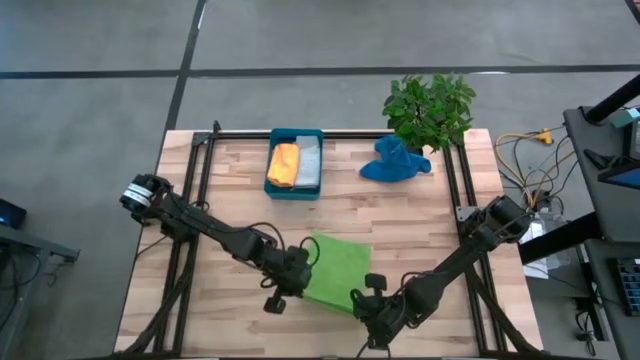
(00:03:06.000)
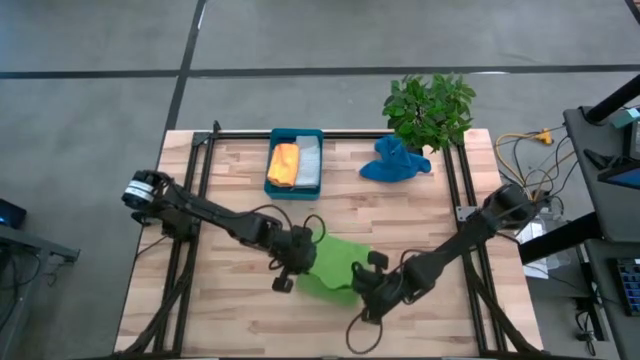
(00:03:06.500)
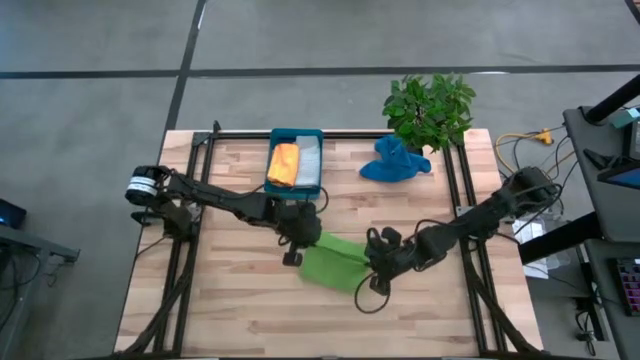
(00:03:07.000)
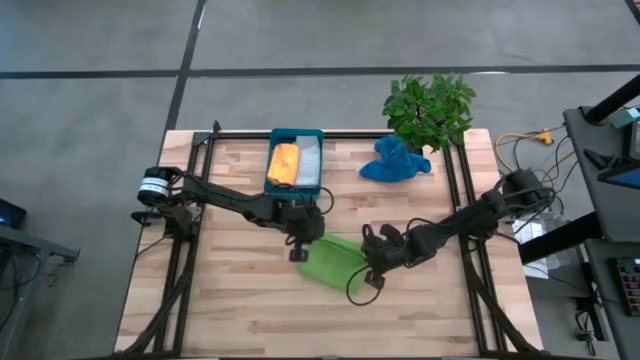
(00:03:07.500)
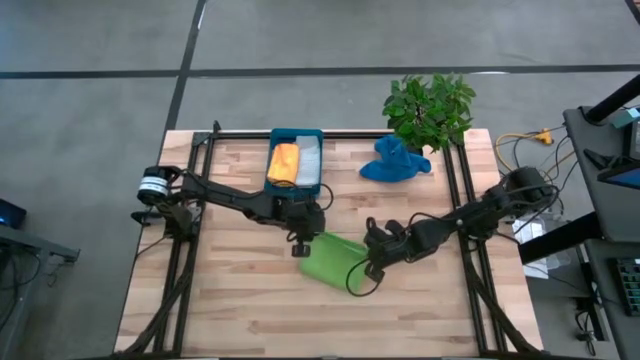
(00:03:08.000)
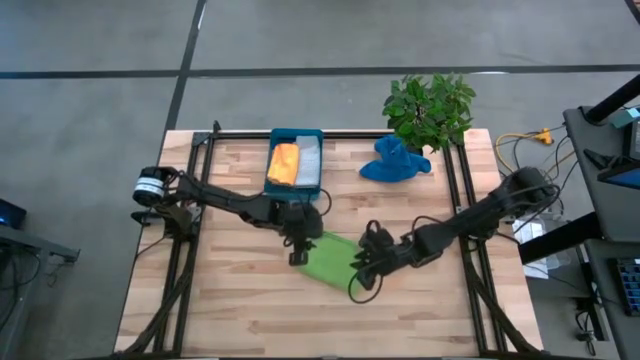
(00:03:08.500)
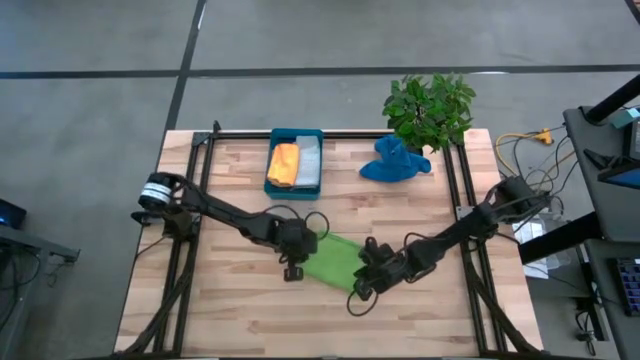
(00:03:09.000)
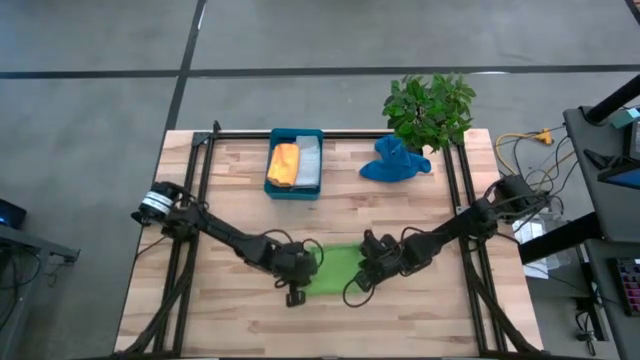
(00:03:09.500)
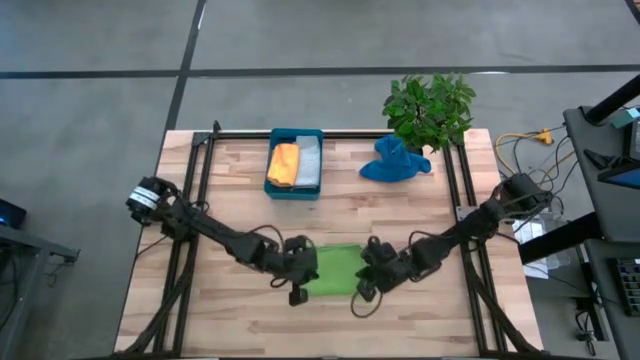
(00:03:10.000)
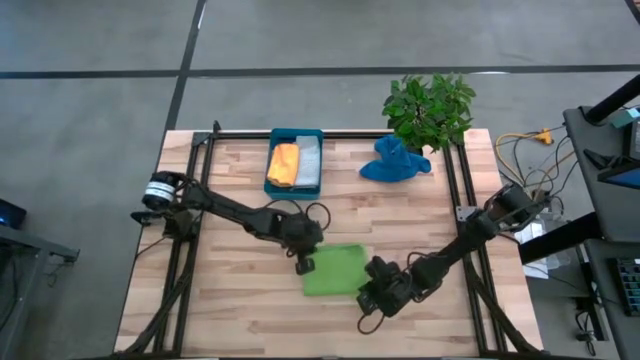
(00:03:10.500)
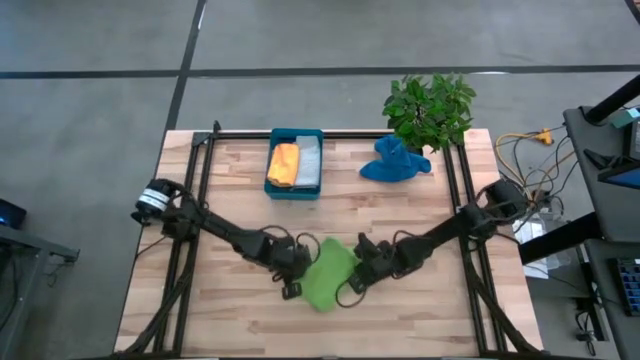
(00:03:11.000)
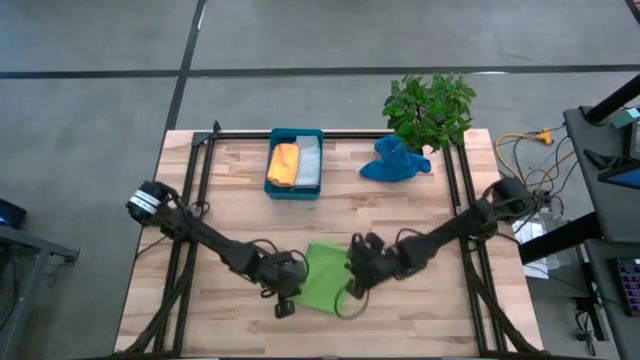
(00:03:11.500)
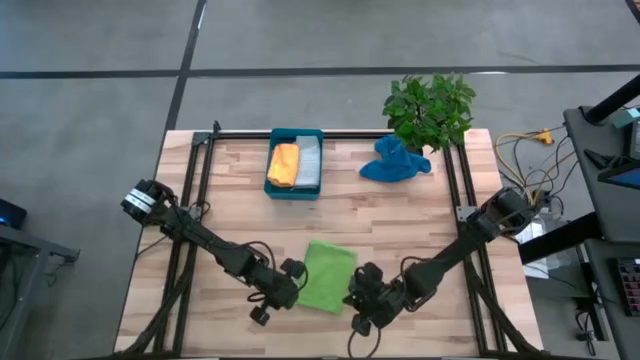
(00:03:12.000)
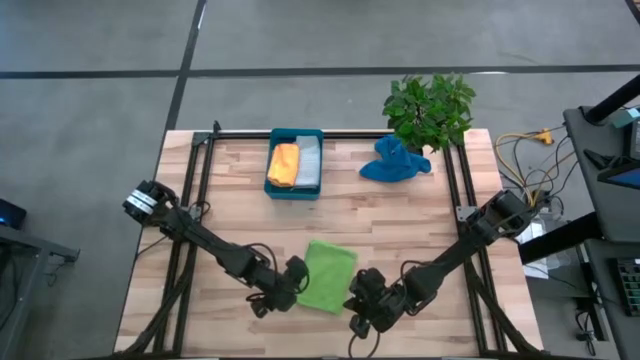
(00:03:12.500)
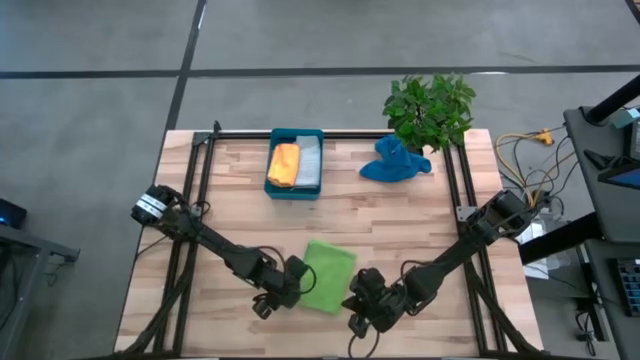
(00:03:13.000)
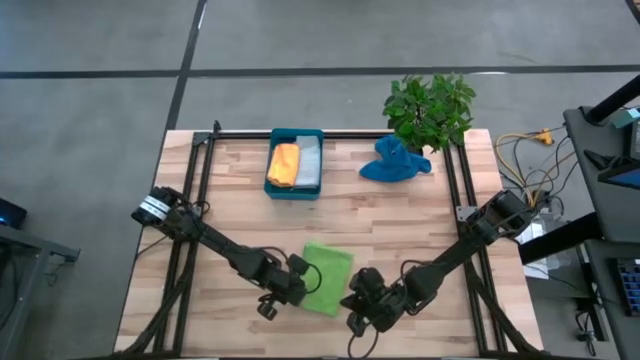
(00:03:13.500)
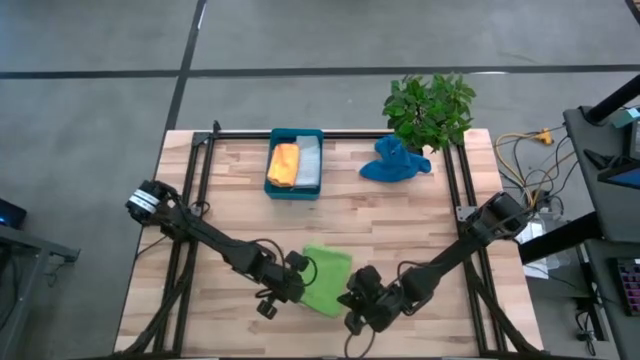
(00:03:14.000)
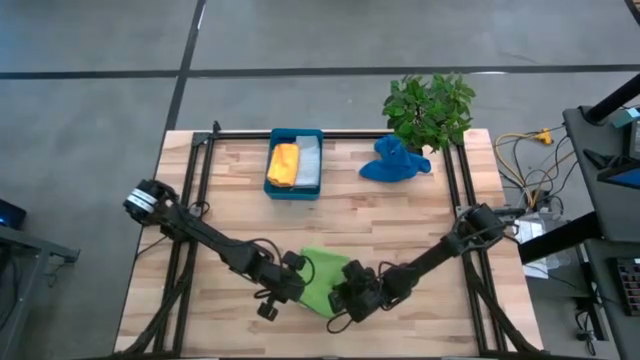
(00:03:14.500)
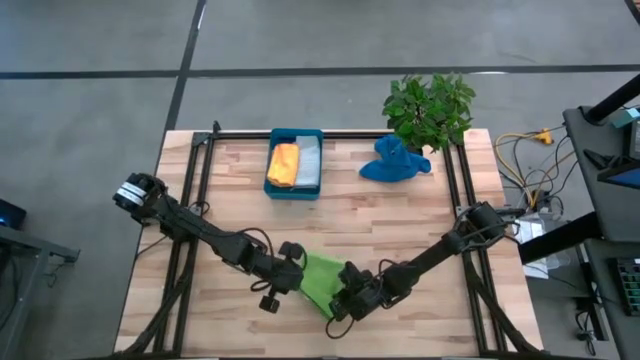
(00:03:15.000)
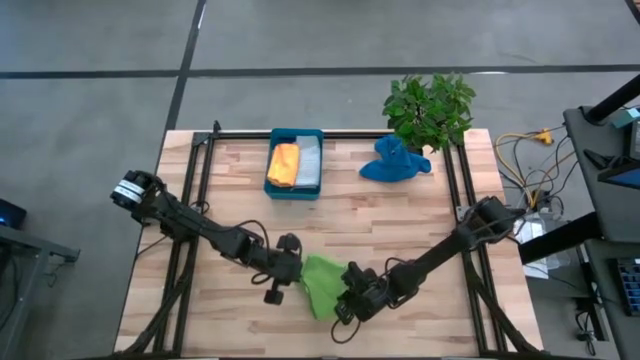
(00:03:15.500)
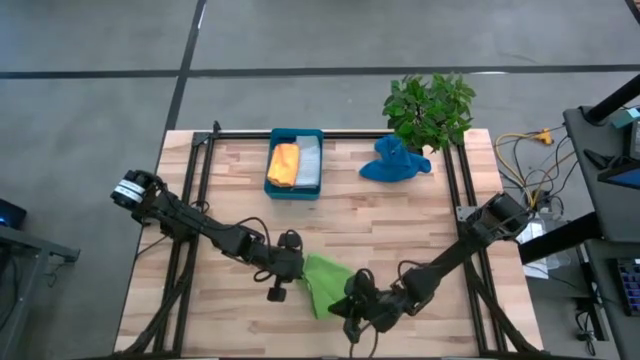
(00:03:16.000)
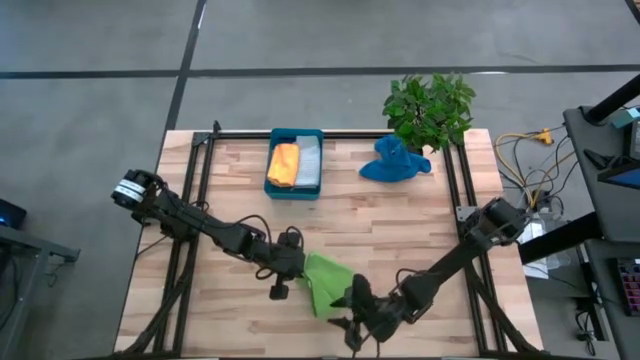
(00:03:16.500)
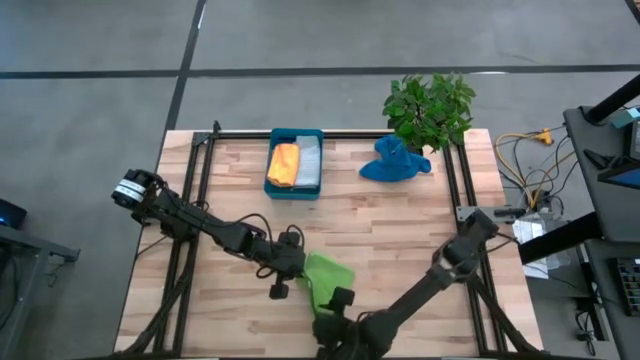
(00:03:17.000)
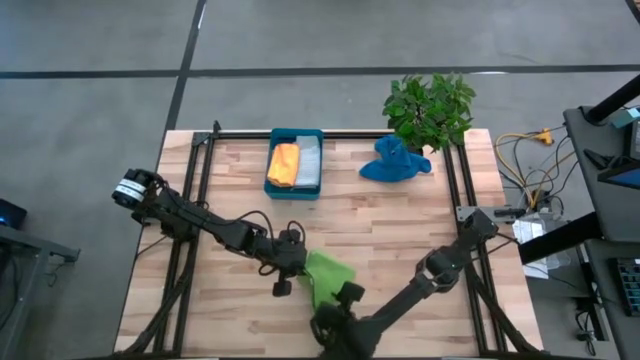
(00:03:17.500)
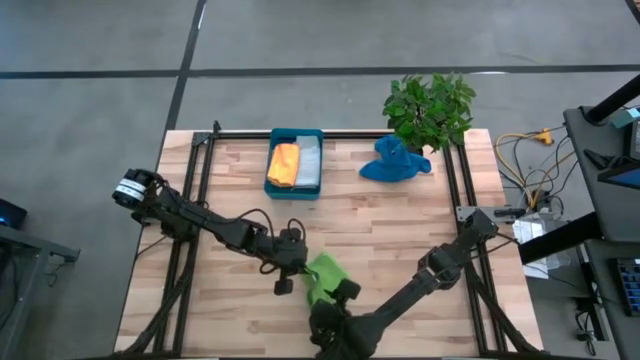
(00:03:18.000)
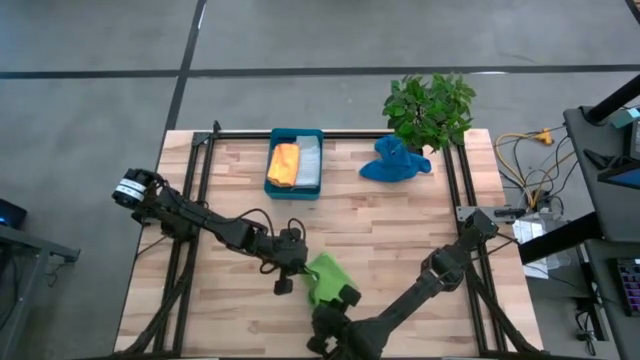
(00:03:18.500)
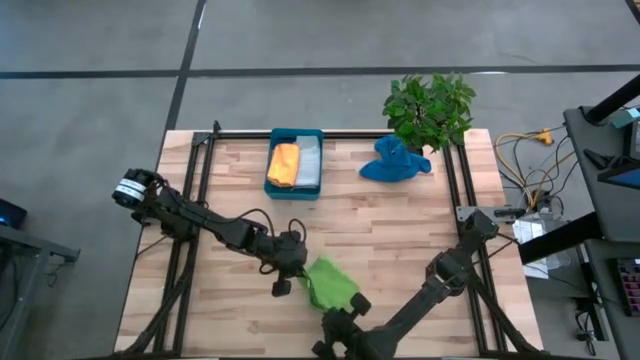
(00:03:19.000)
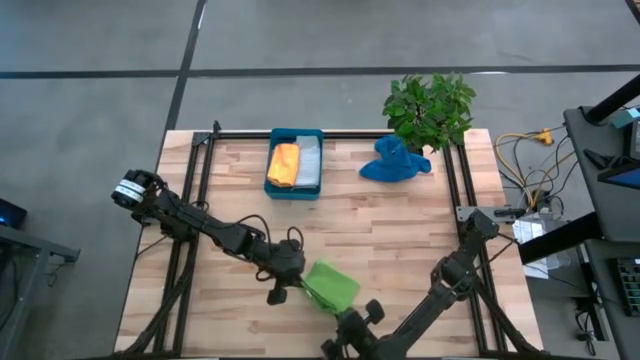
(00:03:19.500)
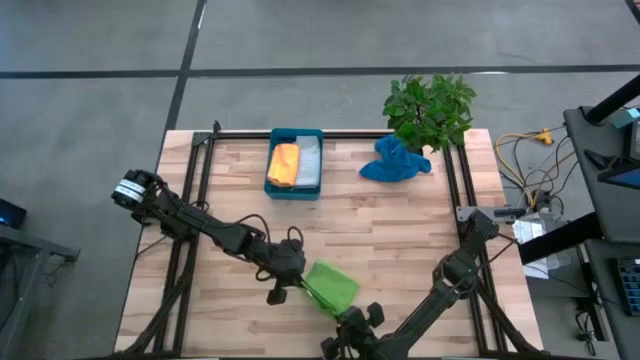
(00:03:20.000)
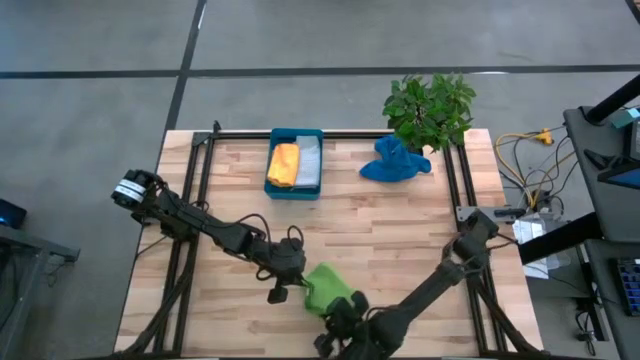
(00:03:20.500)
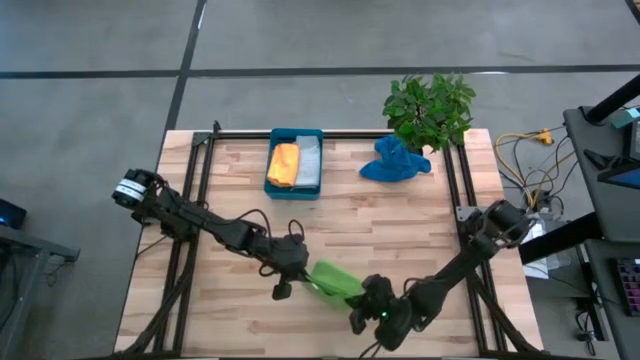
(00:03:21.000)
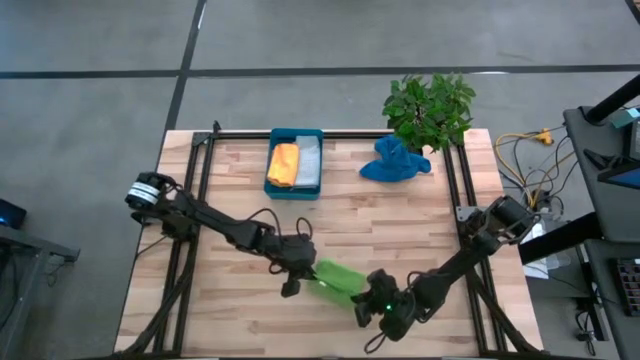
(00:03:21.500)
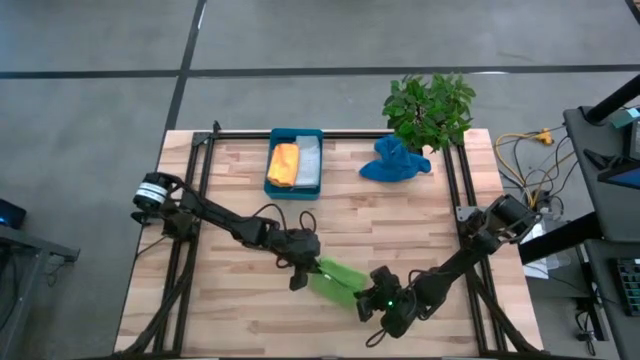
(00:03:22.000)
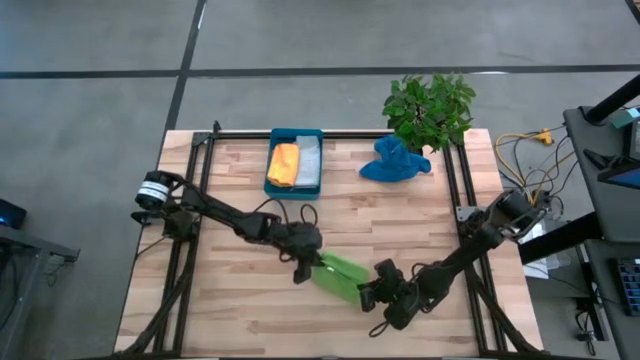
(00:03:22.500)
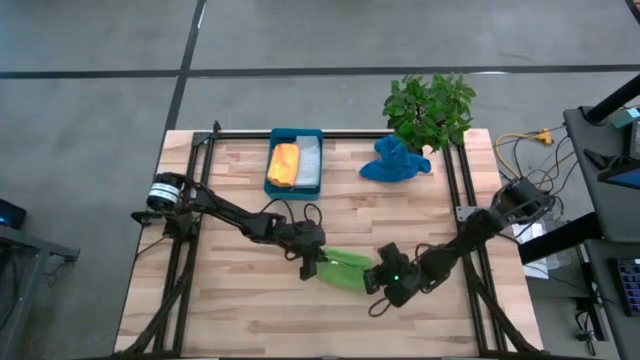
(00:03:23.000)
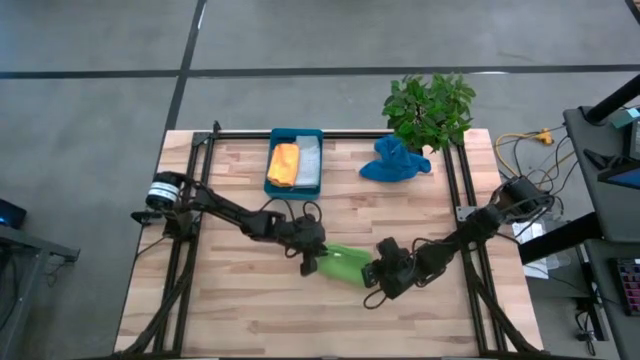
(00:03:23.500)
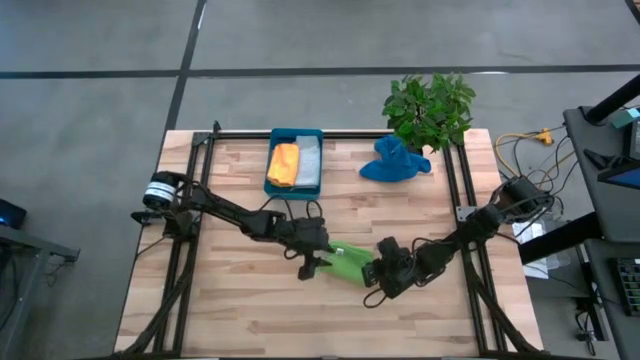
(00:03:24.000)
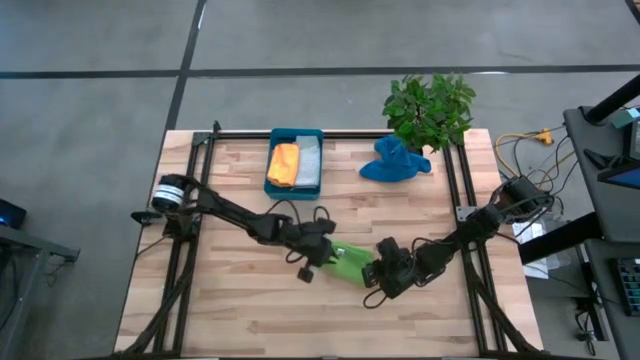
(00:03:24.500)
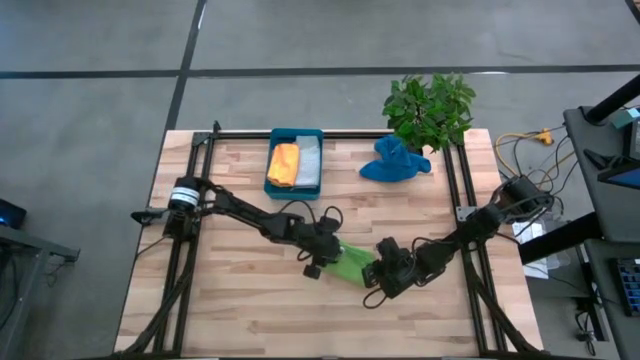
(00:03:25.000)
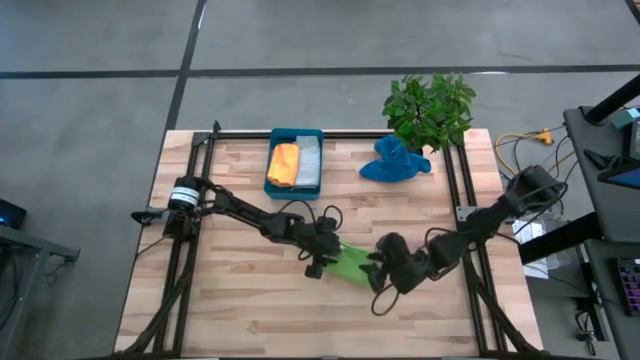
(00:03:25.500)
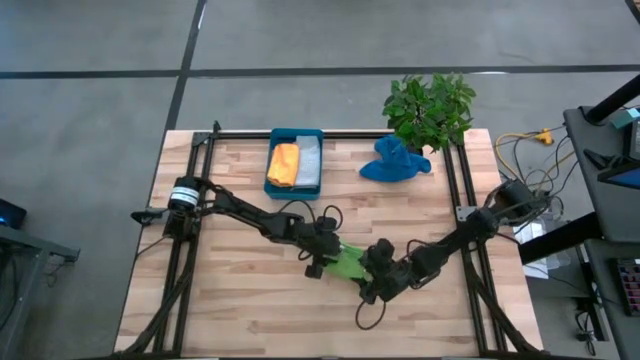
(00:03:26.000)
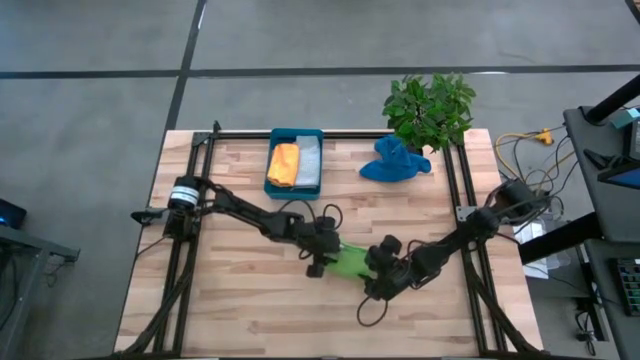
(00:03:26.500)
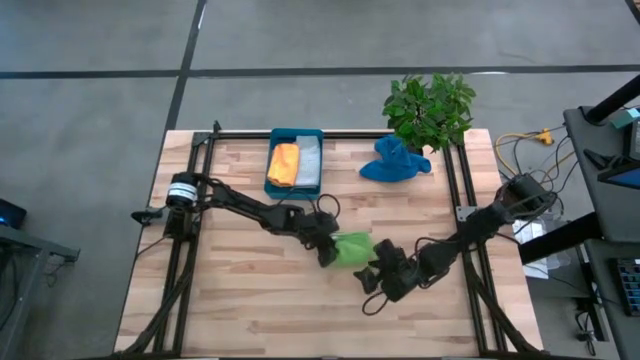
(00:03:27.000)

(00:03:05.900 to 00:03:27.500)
Task: Fold microfiber towels
Fold the green microfiber cloth
